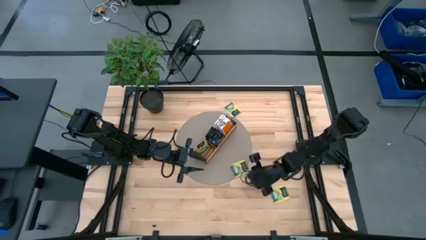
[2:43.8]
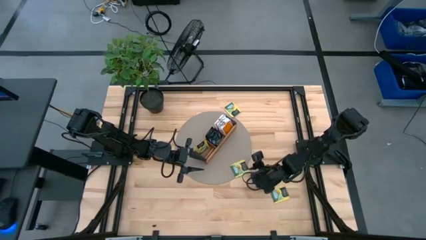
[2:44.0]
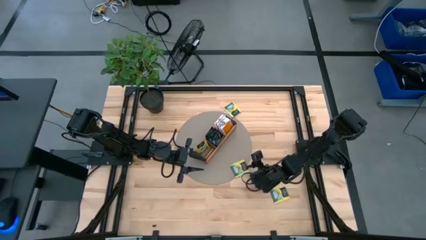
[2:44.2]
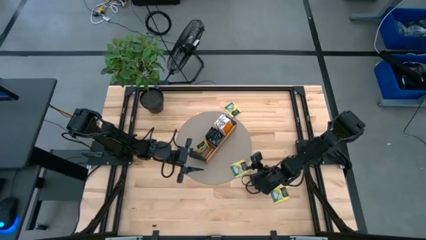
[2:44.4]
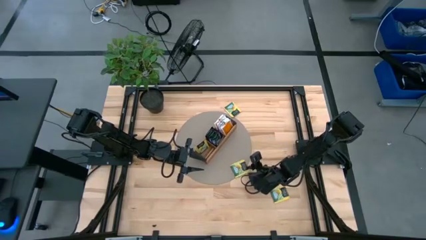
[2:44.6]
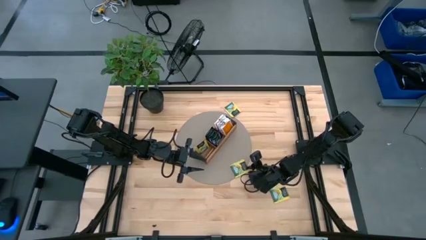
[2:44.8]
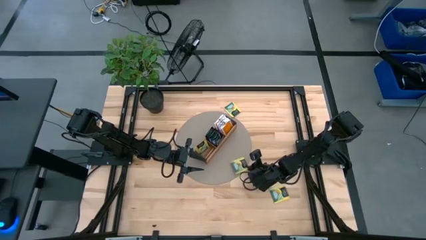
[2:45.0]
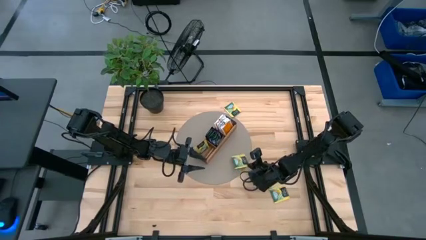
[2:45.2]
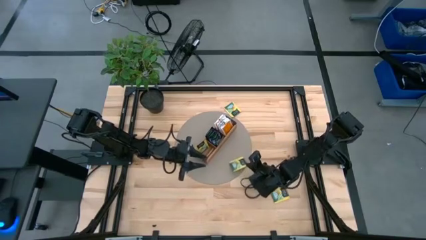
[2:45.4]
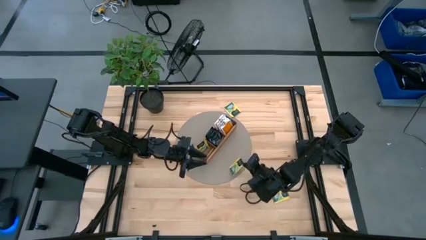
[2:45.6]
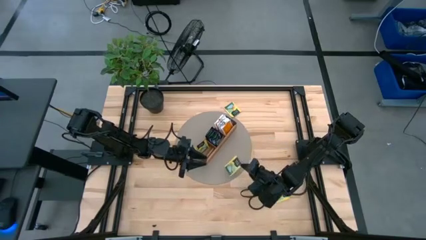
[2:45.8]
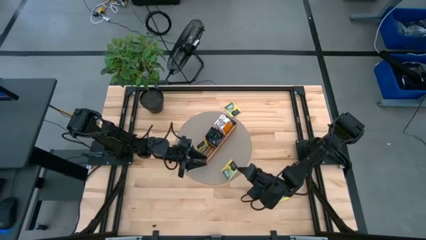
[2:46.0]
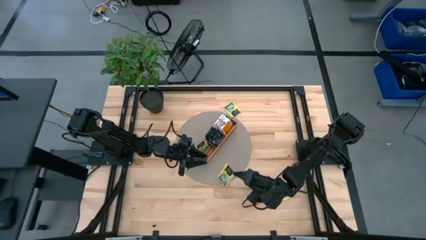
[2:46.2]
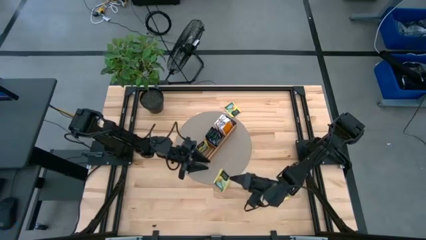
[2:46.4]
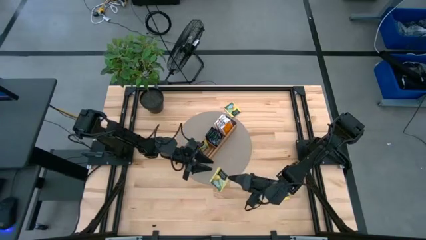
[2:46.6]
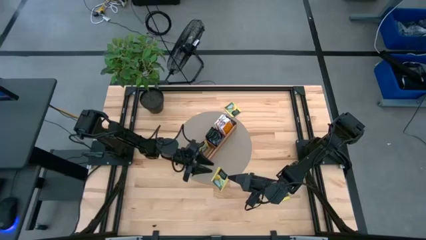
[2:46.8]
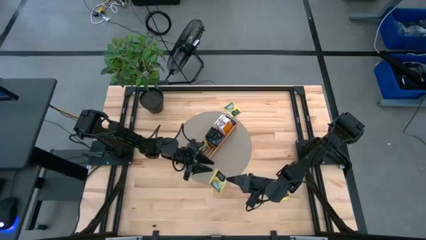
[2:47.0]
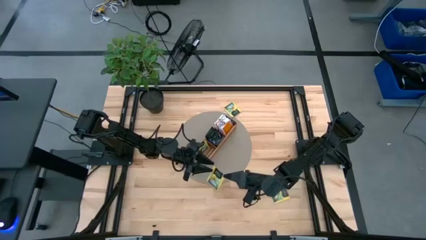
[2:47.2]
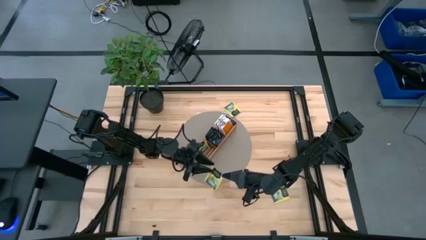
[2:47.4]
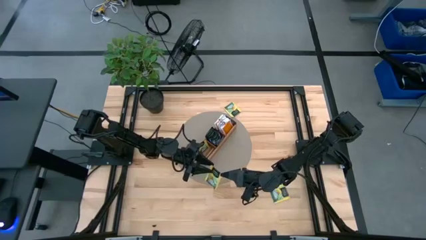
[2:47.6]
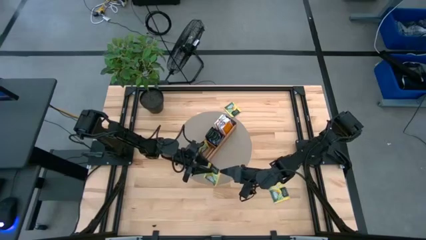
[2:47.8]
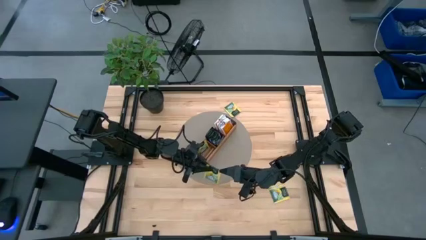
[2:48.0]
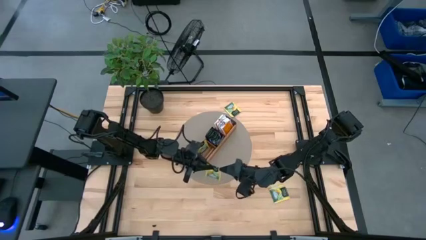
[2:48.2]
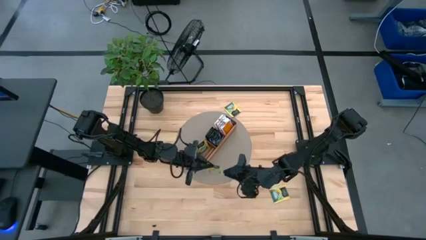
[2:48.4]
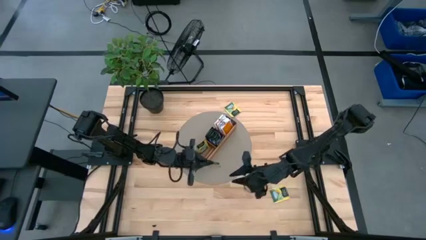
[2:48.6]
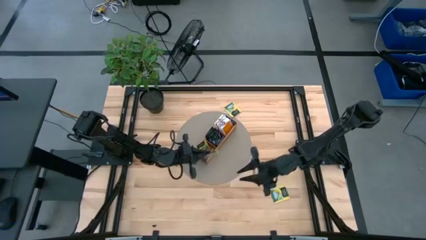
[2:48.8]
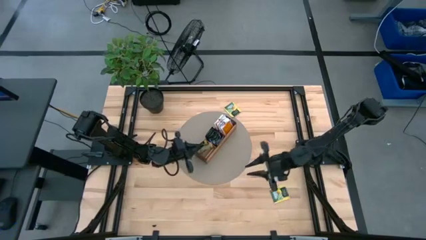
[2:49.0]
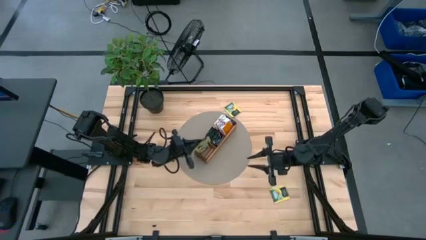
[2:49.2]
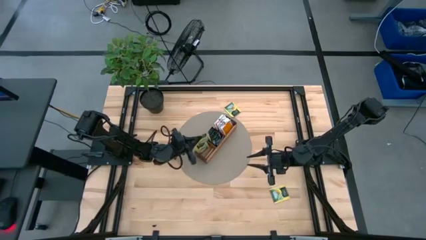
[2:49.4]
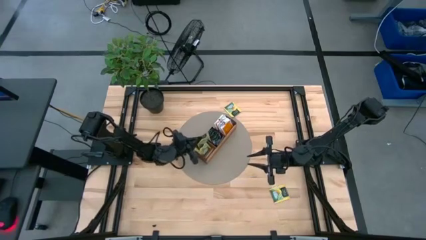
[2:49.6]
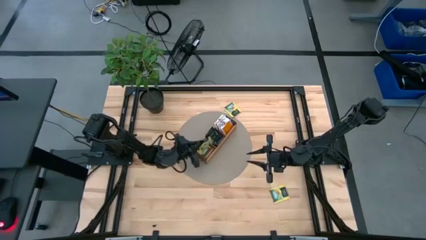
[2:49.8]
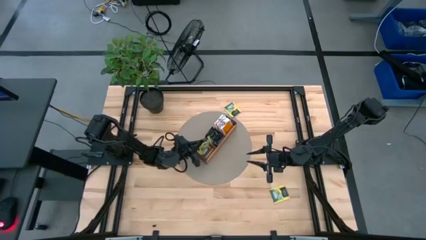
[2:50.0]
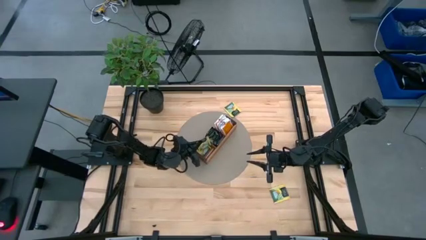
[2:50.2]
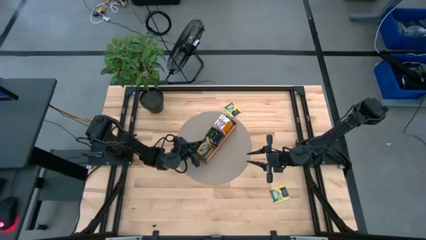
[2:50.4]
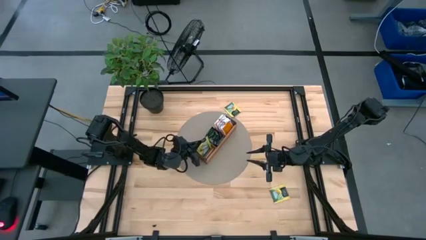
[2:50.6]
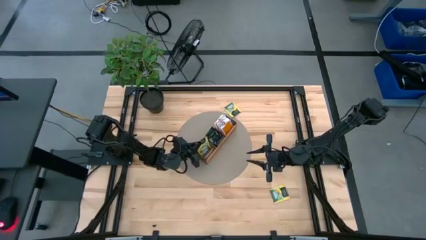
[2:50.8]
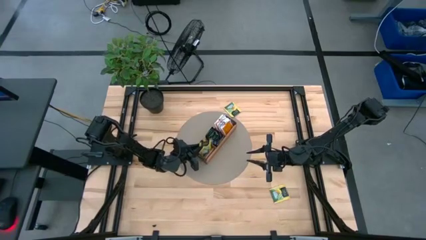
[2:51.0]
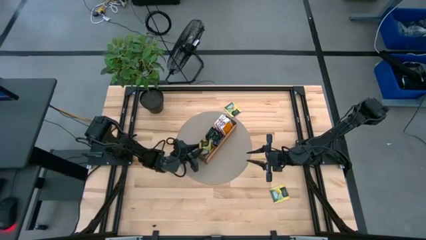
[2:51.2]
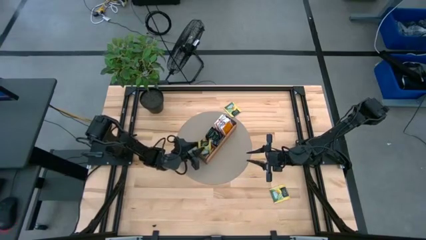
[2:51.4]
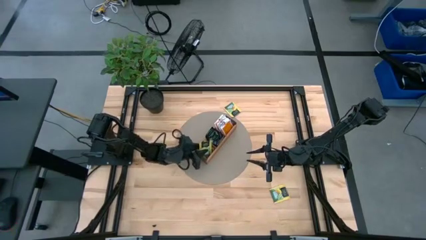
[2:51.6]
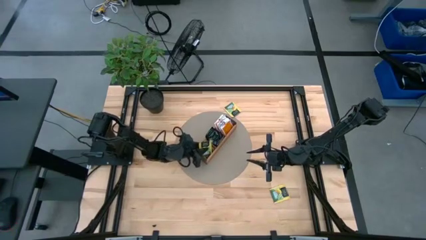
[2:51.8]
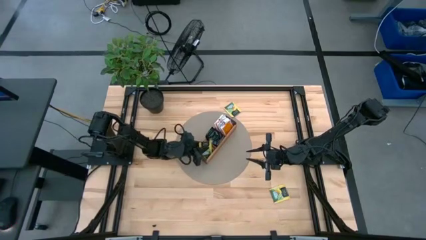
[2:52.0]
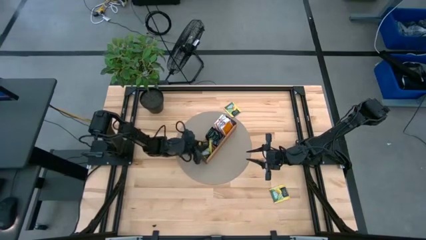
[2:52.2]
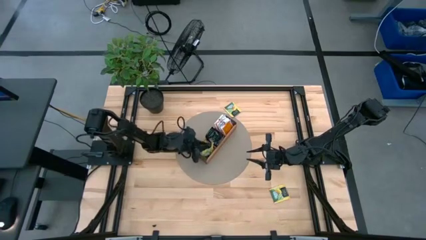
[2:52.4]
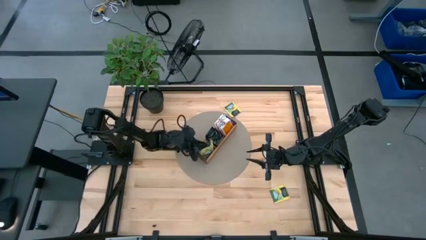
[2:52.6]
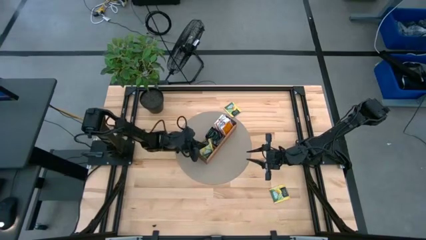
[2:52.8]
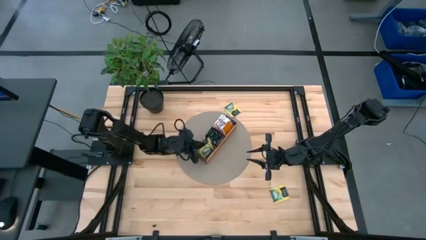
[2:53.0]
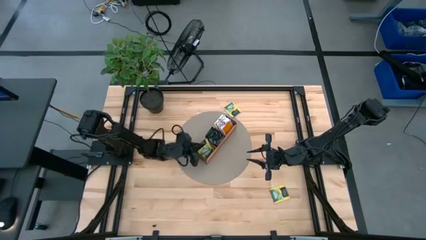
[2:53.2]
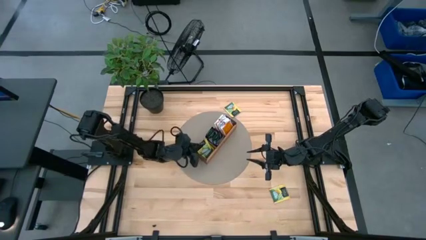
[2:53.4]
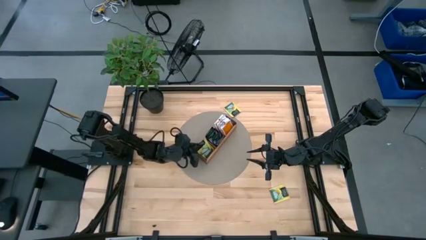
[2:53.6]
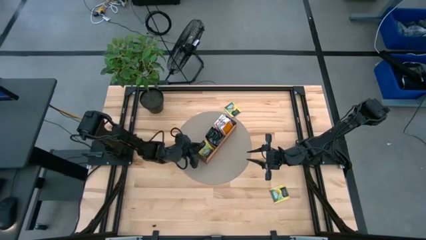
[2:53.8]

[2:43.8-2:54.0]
Task: Pick & Place Tea
Put the yellow tea bag into the left section of the wooden organizer
